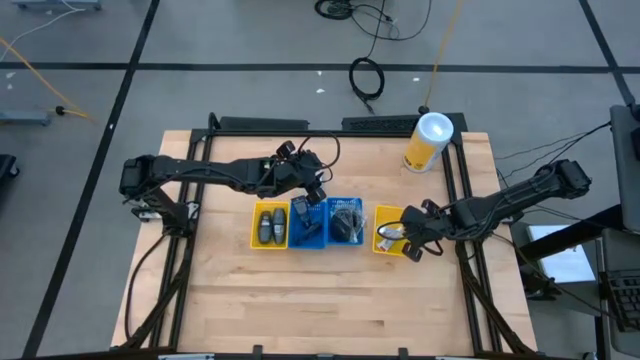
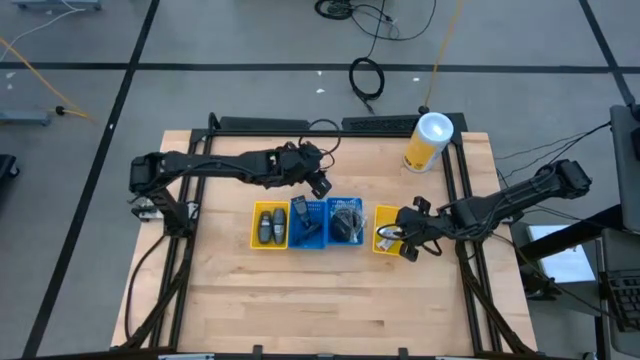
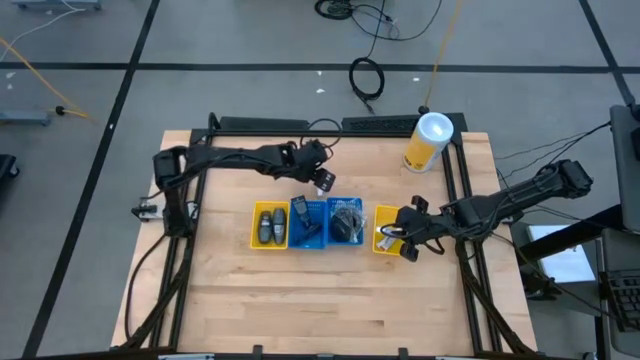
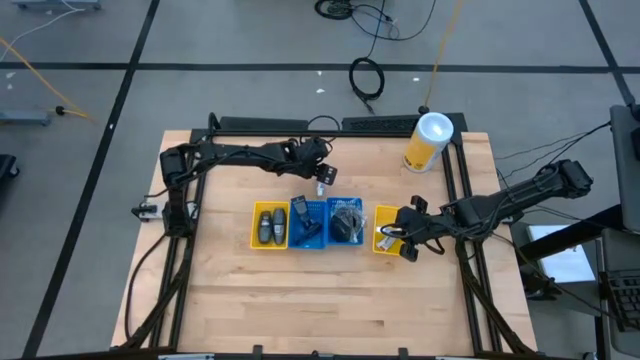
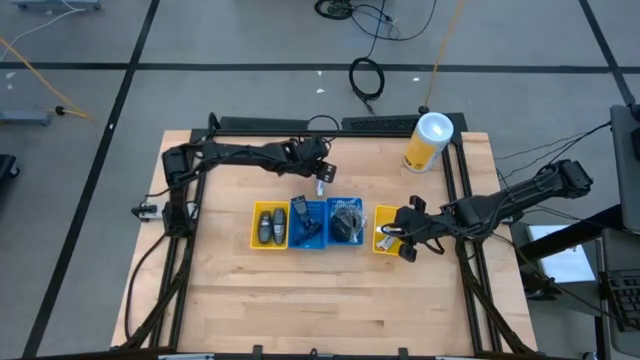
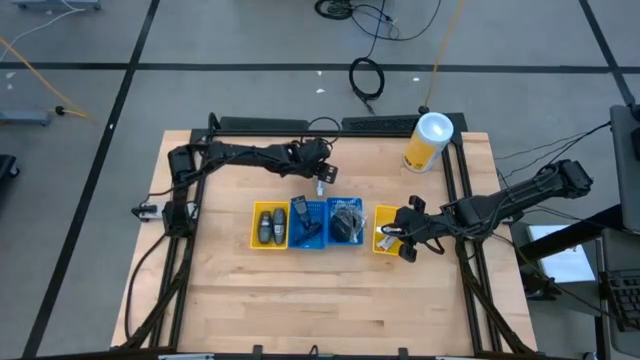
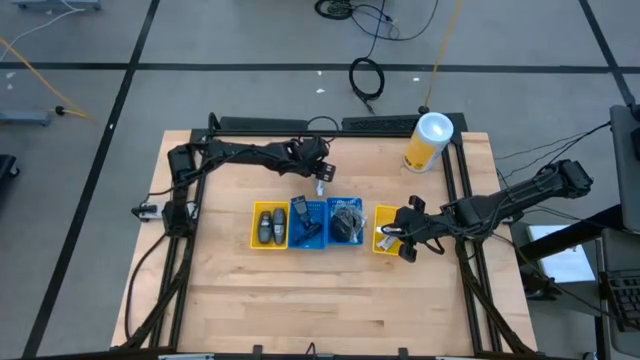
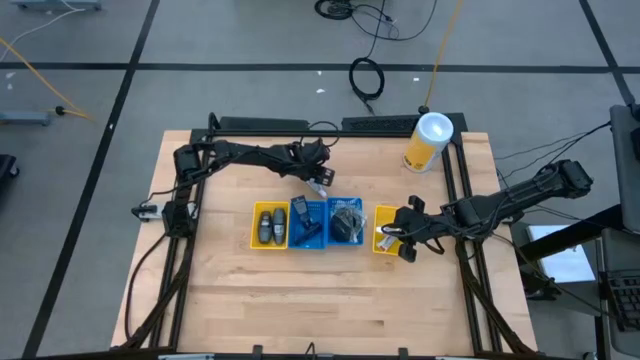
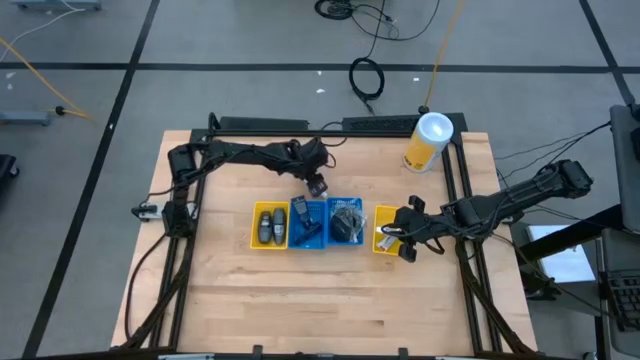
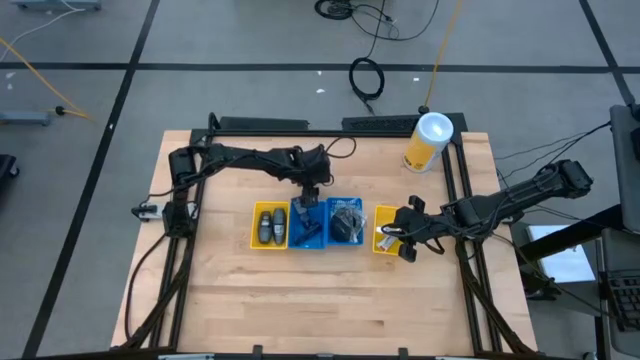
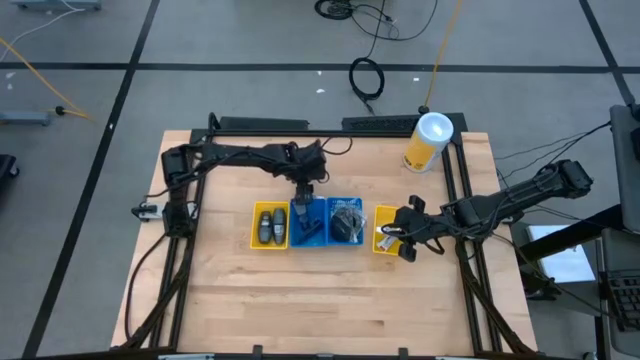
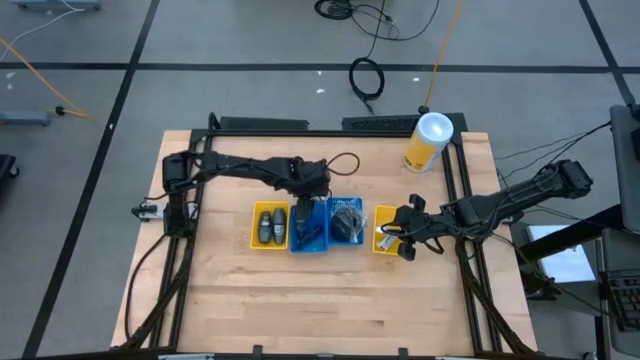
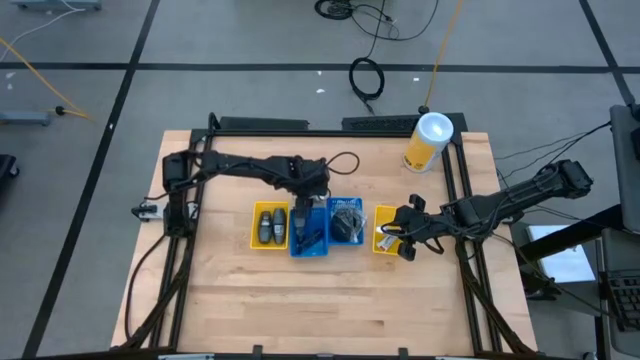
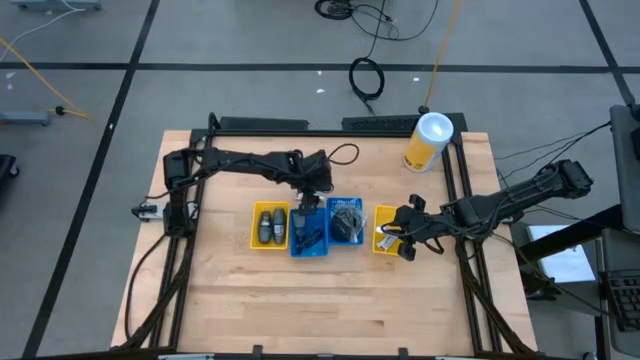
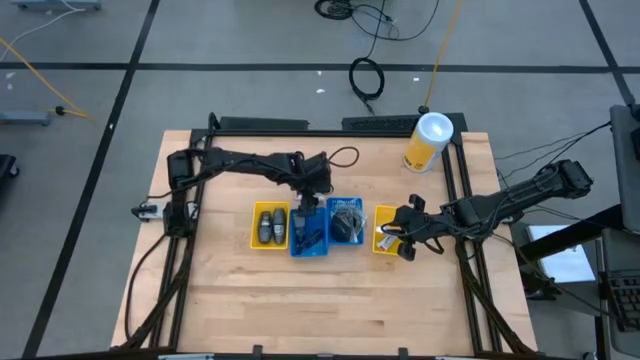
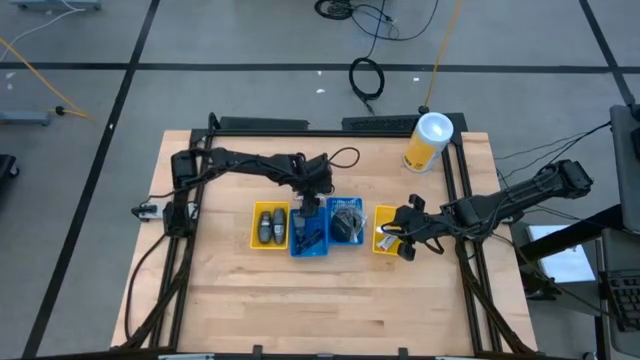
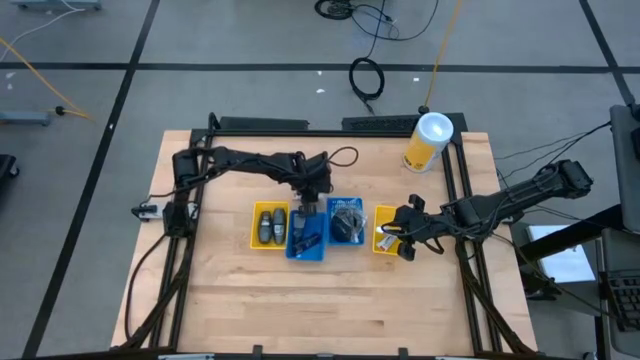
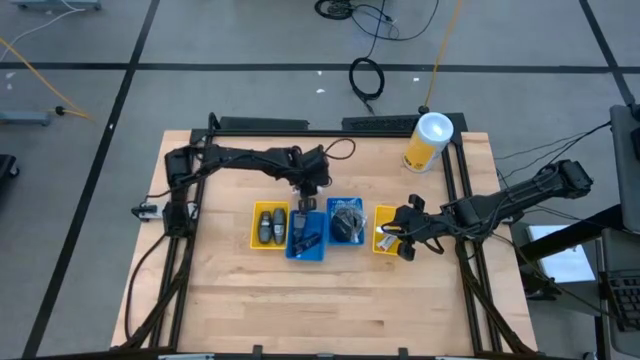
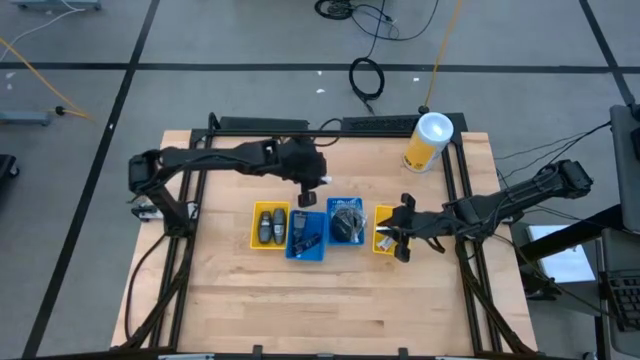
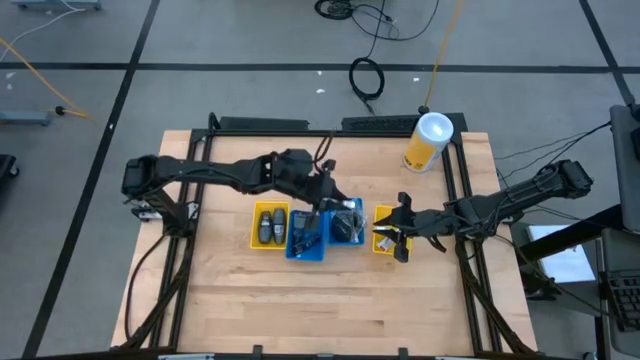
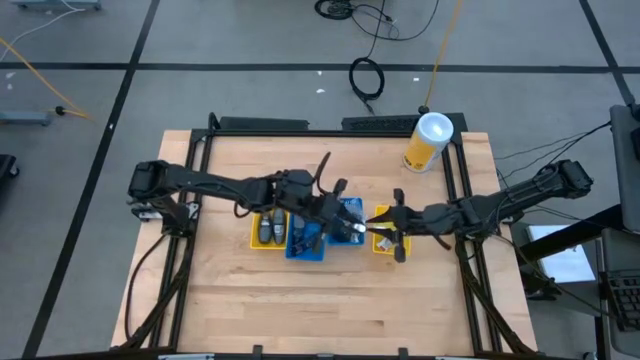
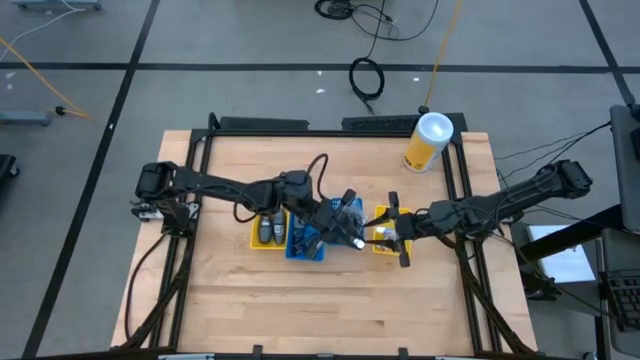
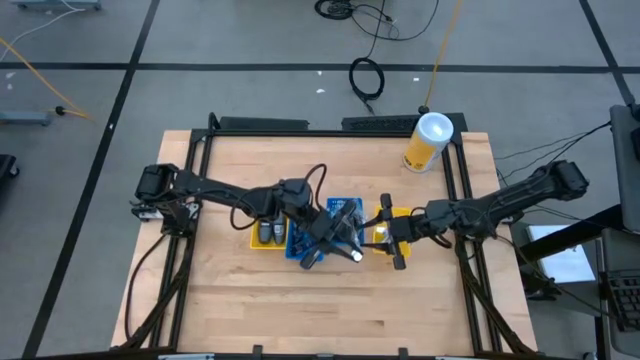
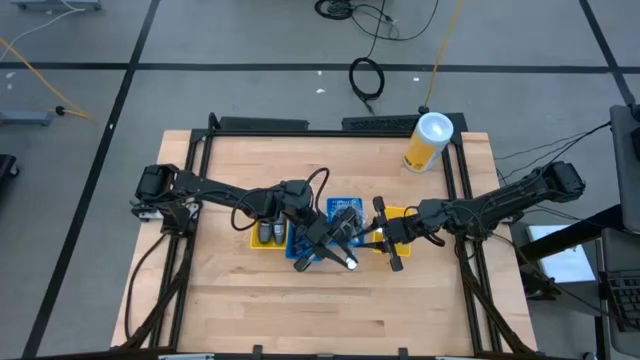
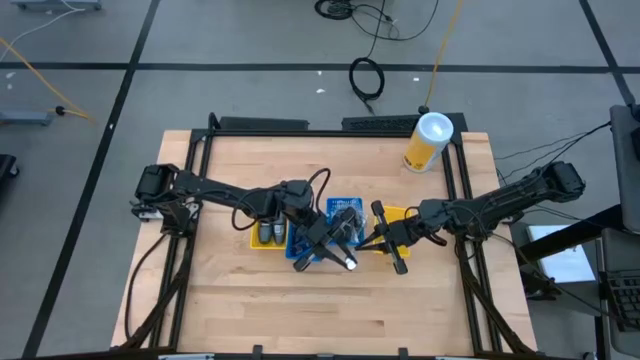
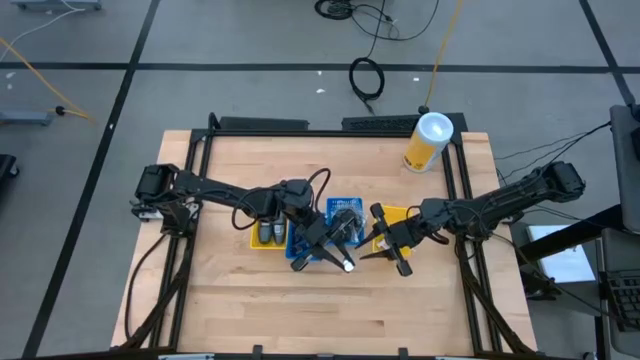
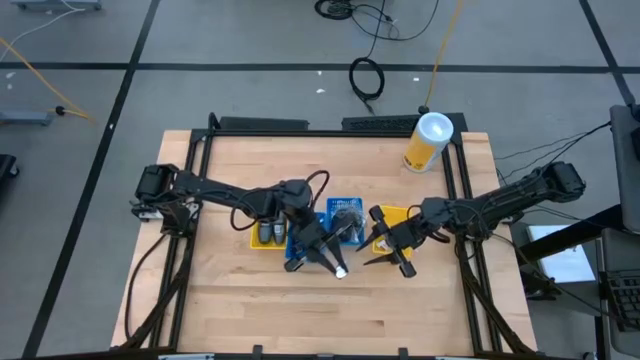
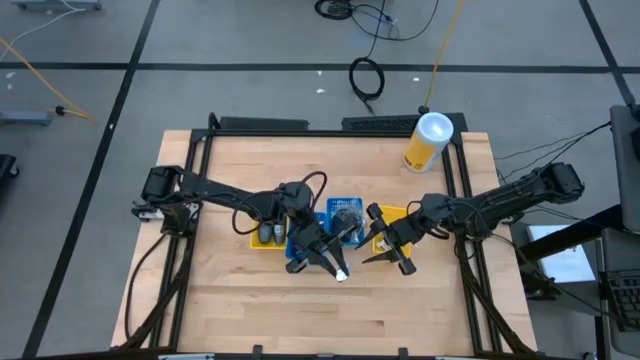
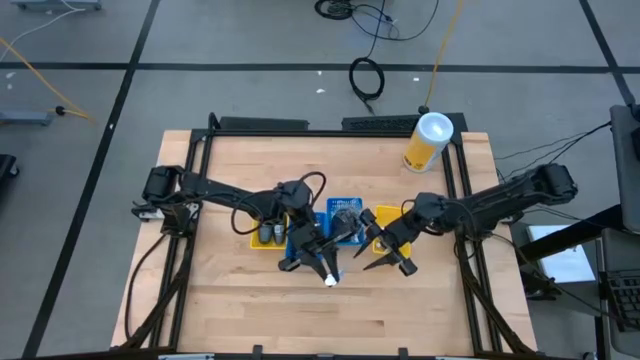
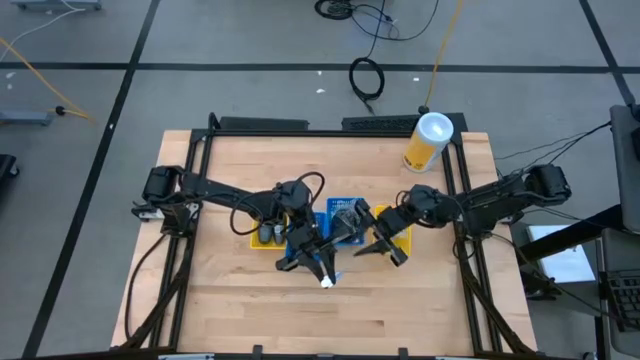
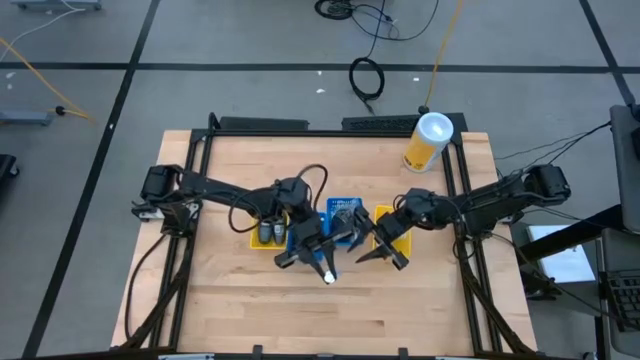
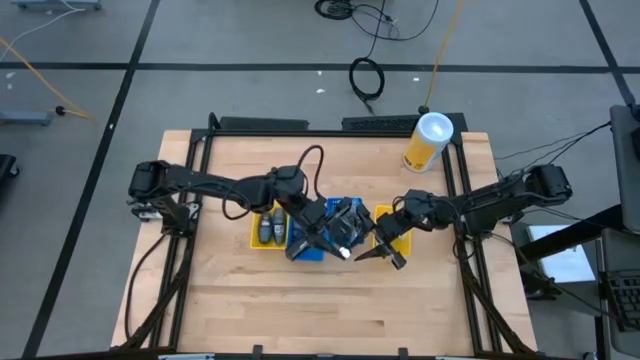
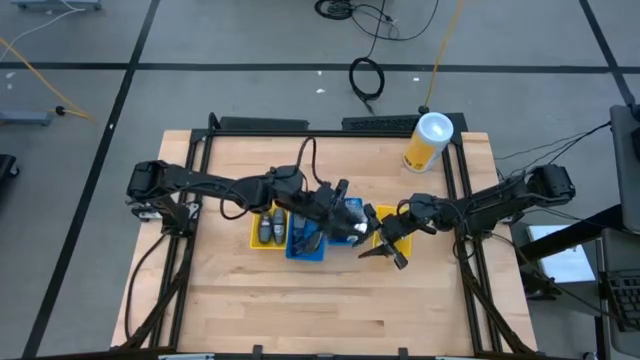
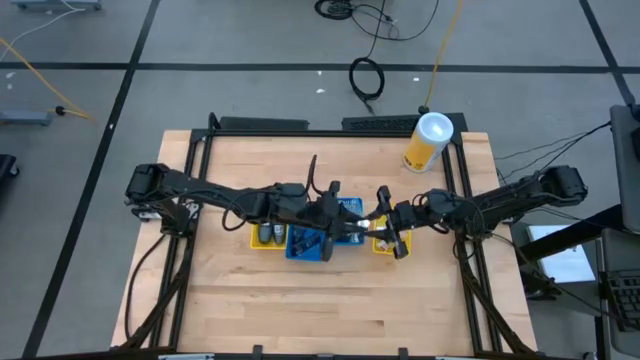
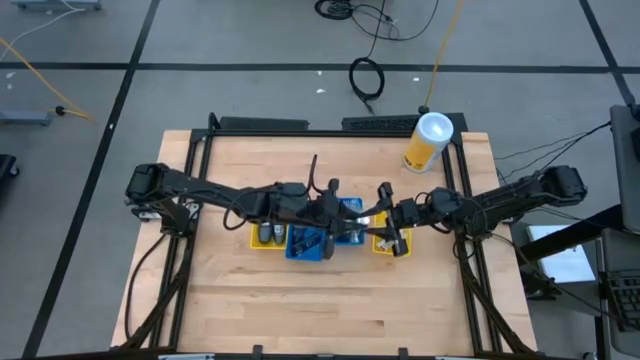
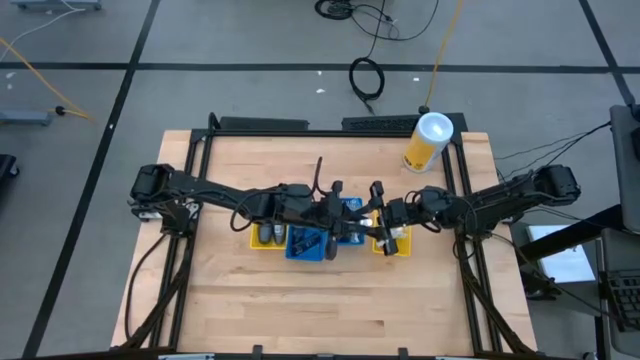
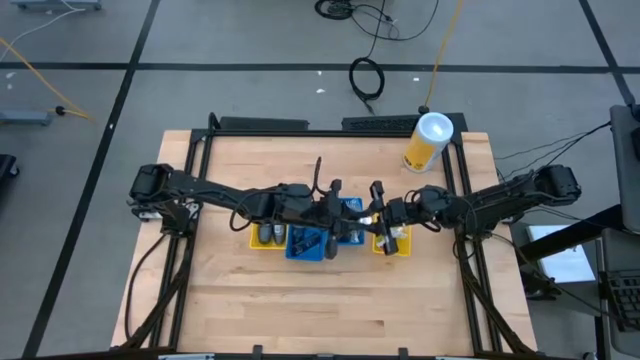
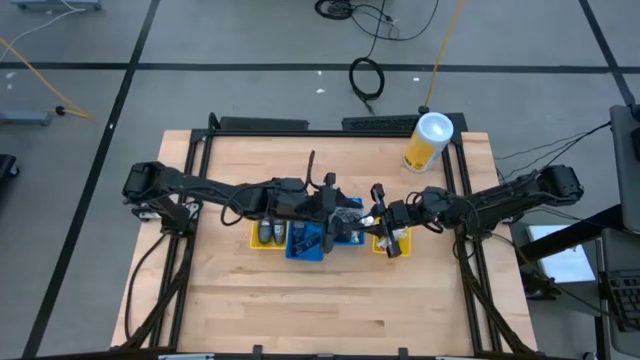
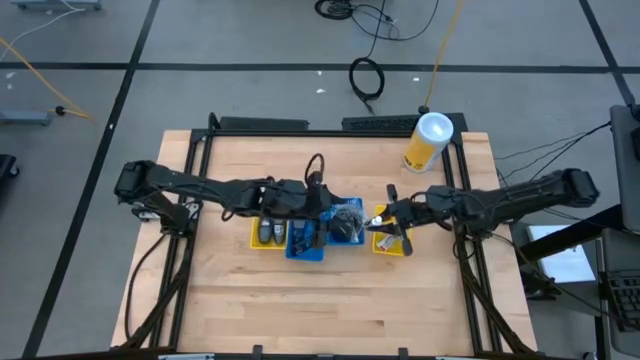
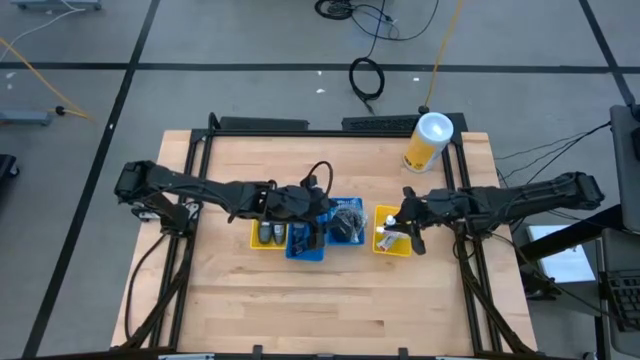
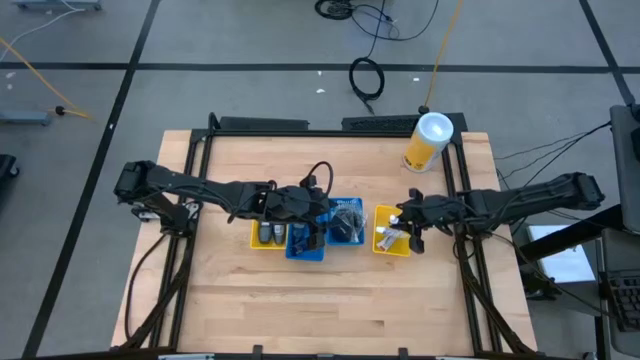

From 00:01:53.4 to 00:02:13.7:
Task: Pick & Place Travel size toiletries
Put the toothpaste into the right yellow bin

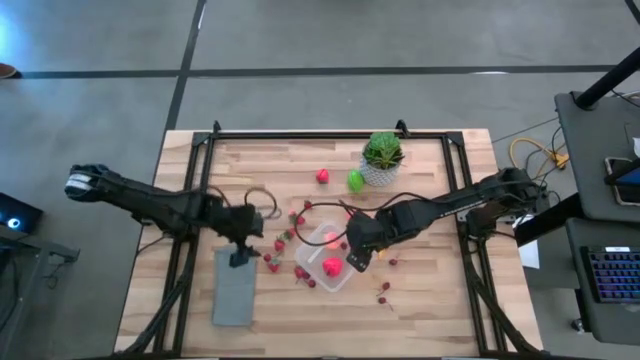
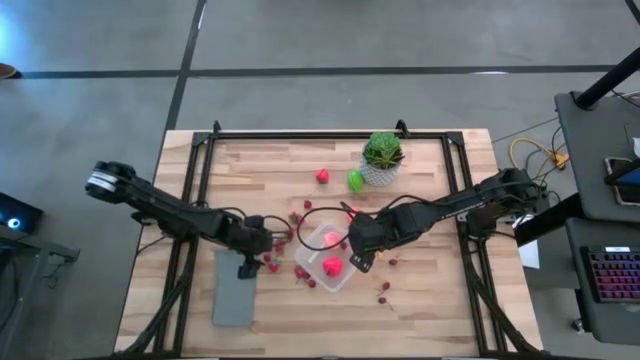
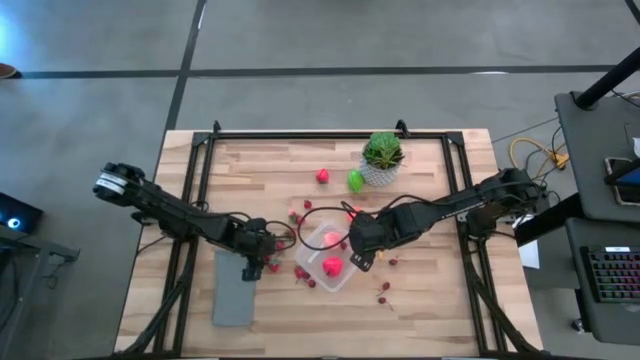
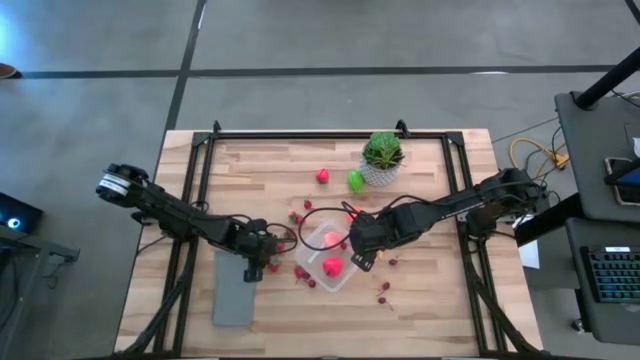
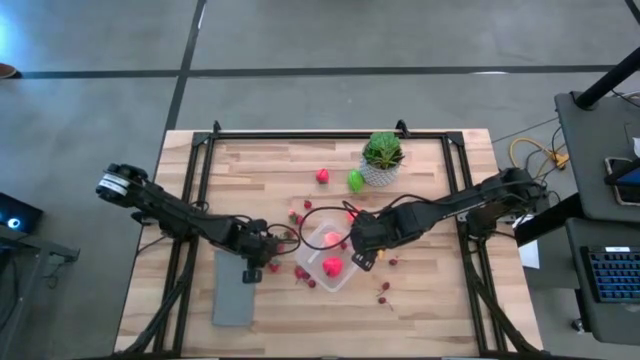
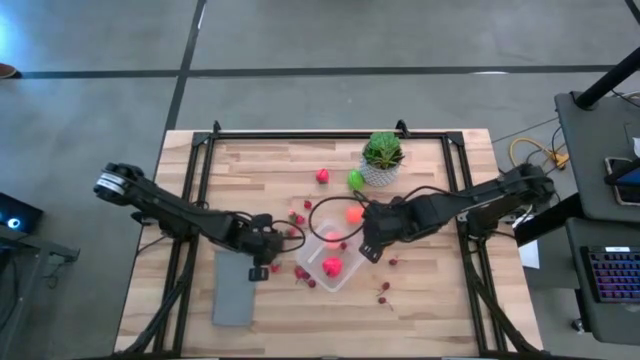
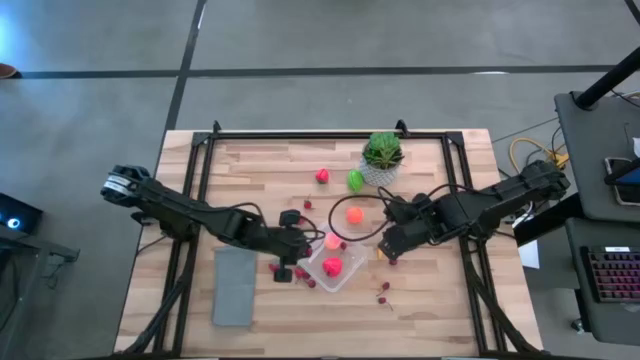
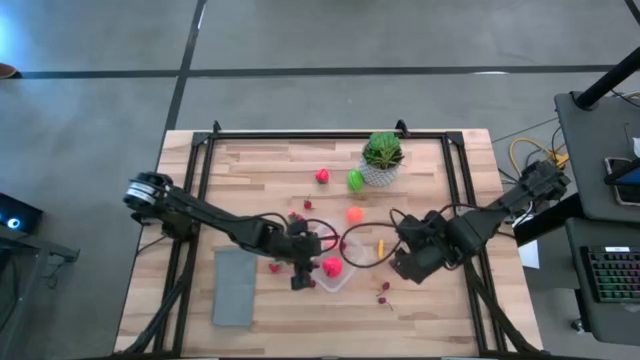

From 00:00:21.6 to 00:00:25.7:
Task: Pick and placing Produce into tupperware
Put the red cherry into the transparent bin
